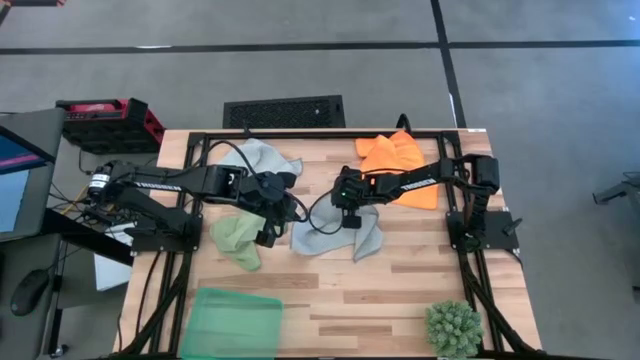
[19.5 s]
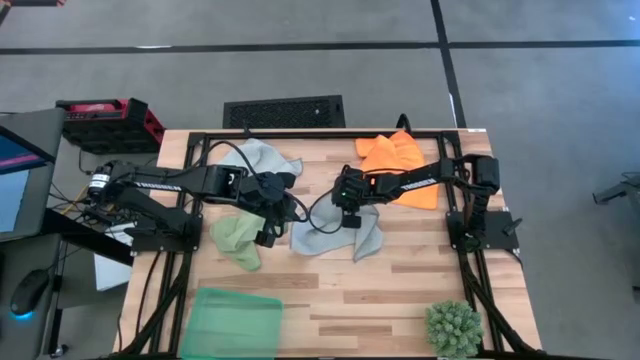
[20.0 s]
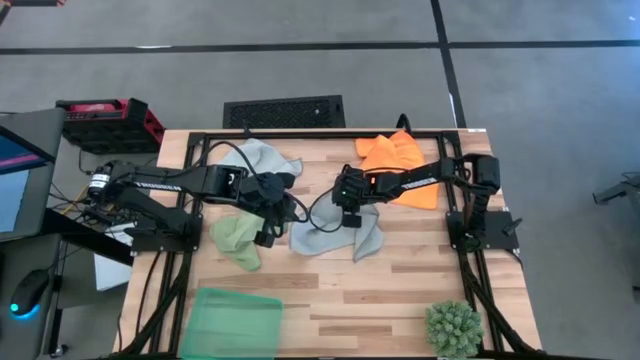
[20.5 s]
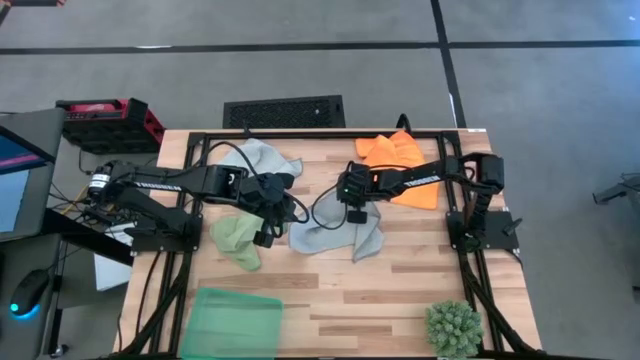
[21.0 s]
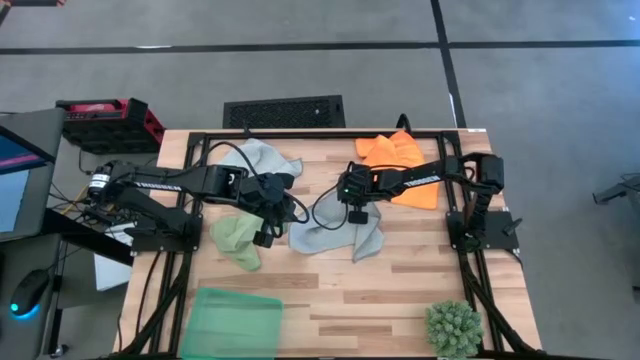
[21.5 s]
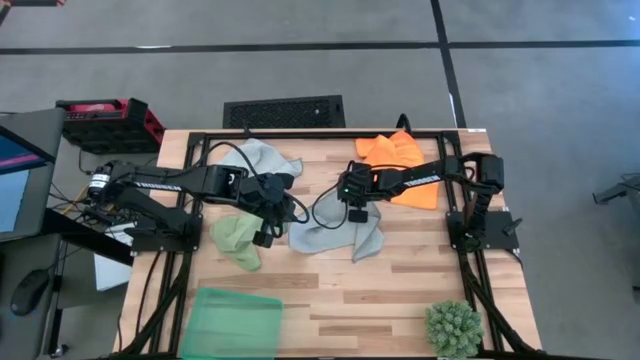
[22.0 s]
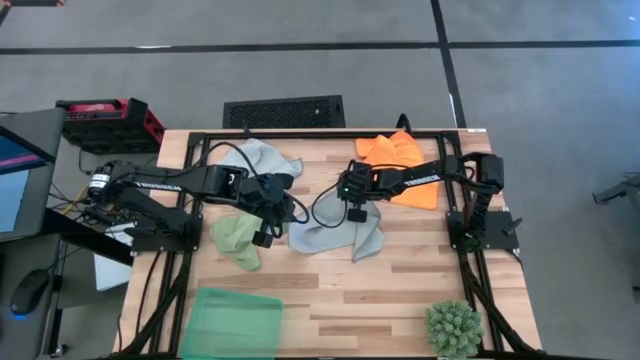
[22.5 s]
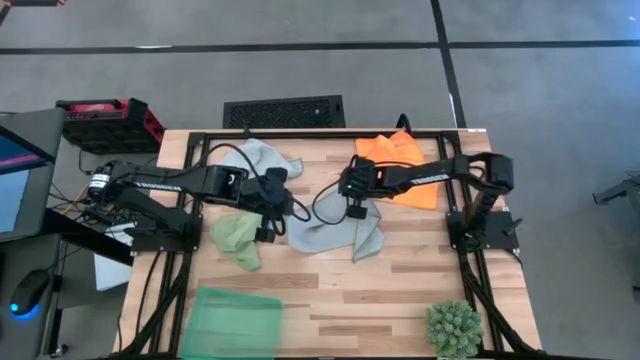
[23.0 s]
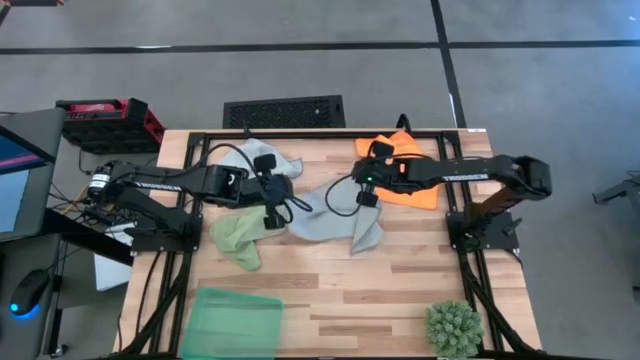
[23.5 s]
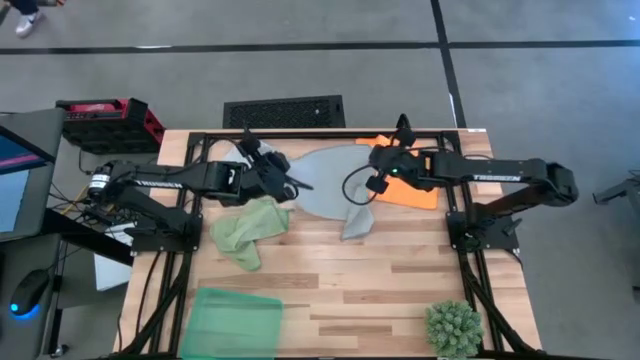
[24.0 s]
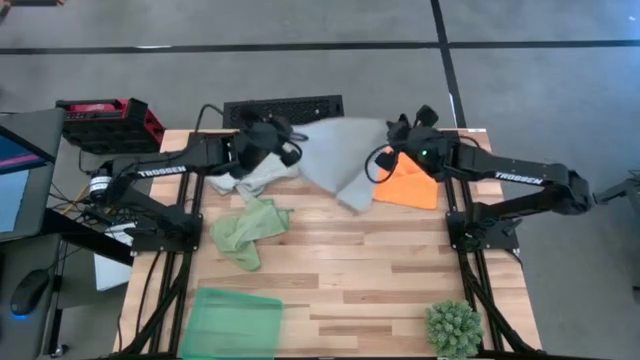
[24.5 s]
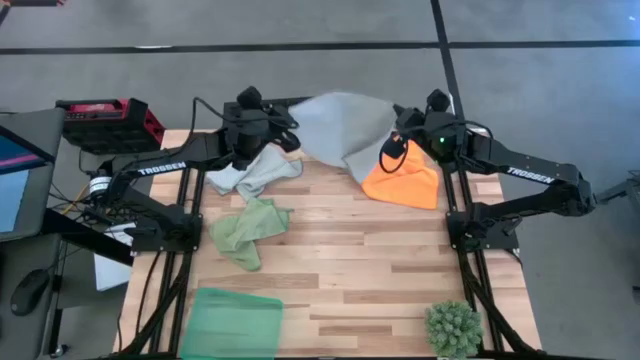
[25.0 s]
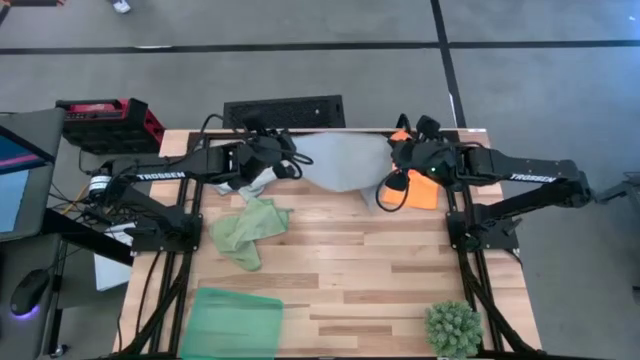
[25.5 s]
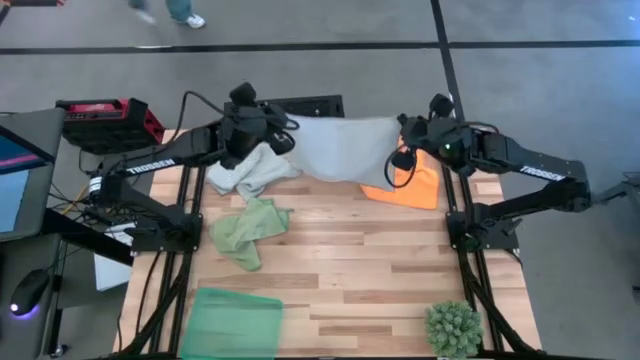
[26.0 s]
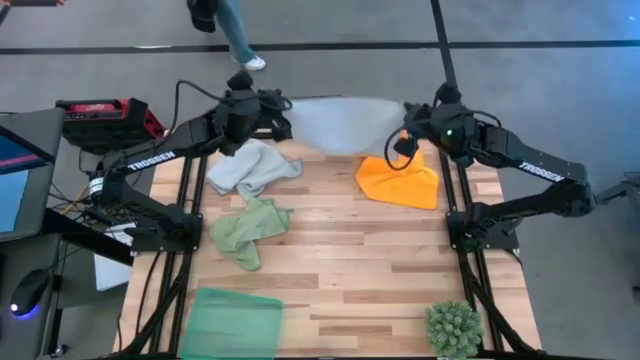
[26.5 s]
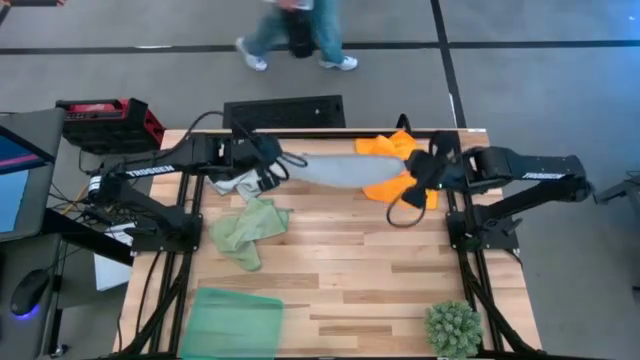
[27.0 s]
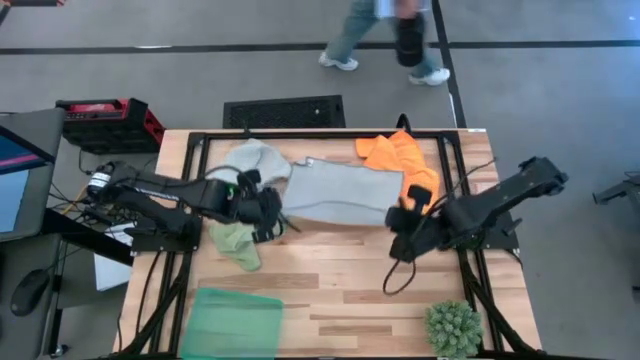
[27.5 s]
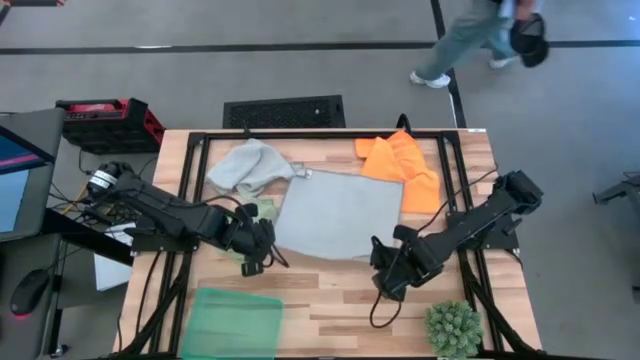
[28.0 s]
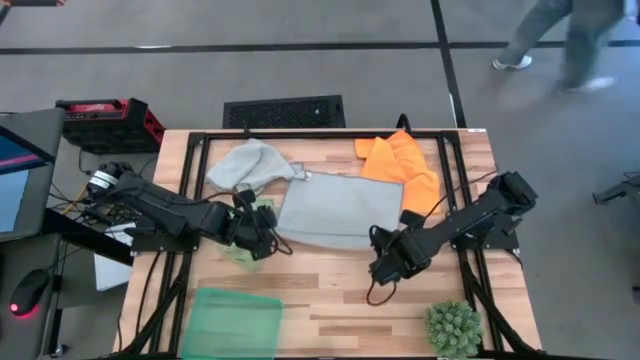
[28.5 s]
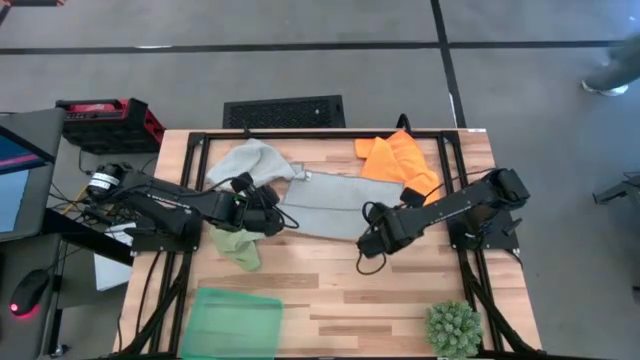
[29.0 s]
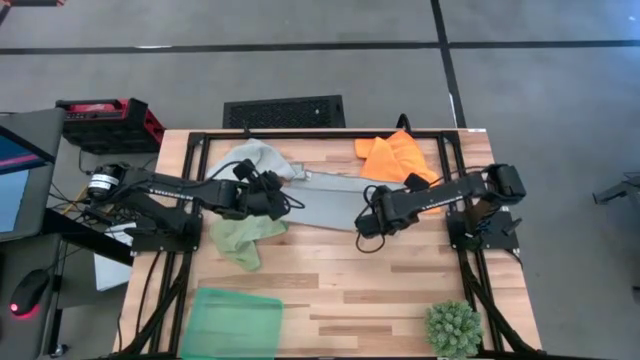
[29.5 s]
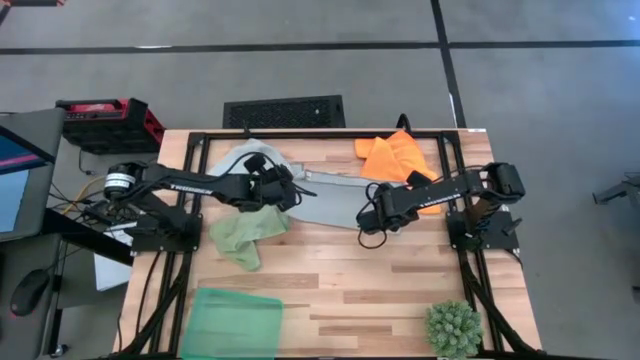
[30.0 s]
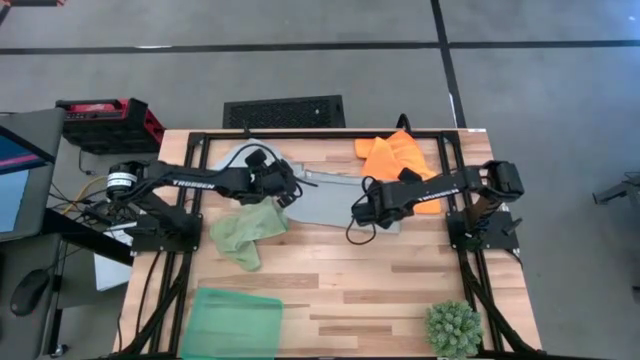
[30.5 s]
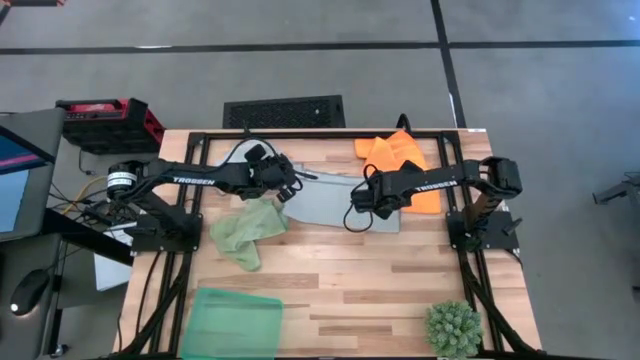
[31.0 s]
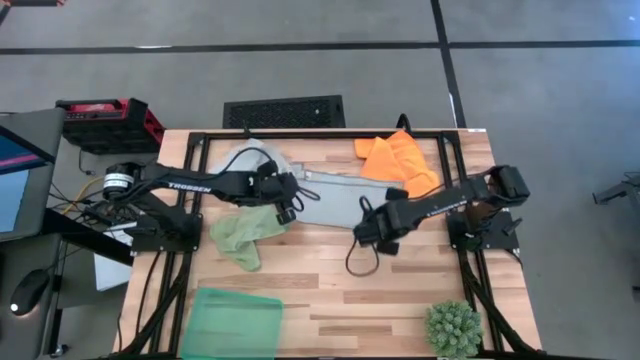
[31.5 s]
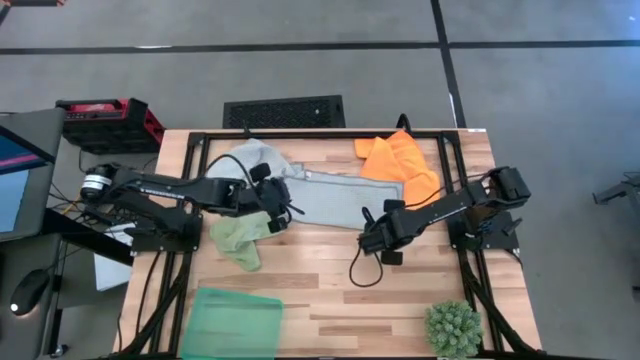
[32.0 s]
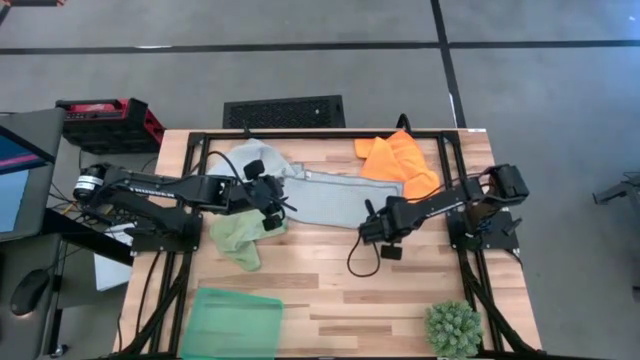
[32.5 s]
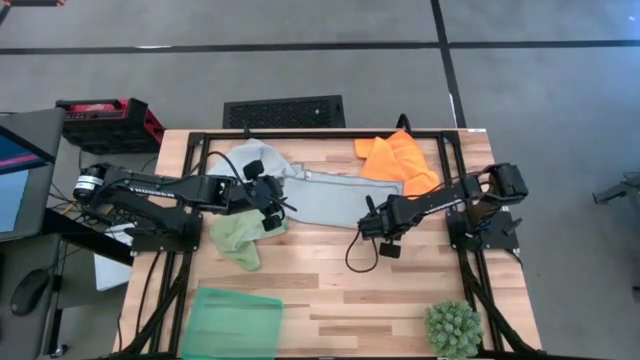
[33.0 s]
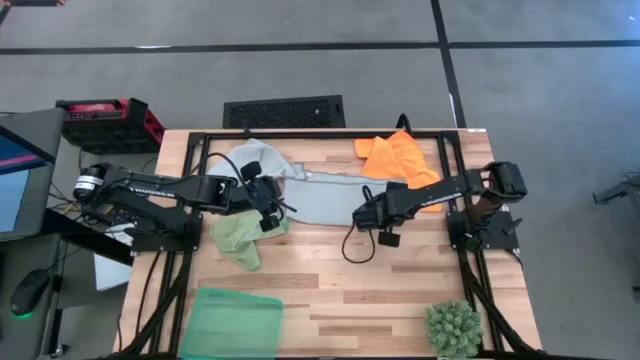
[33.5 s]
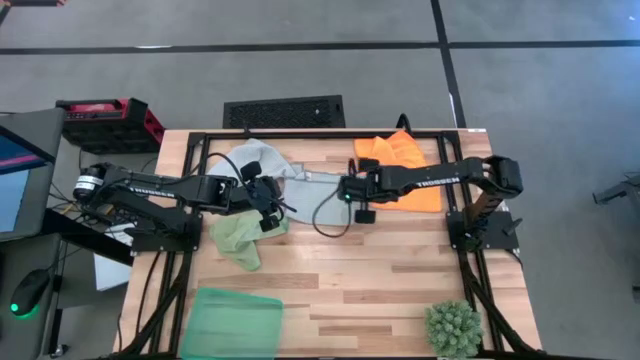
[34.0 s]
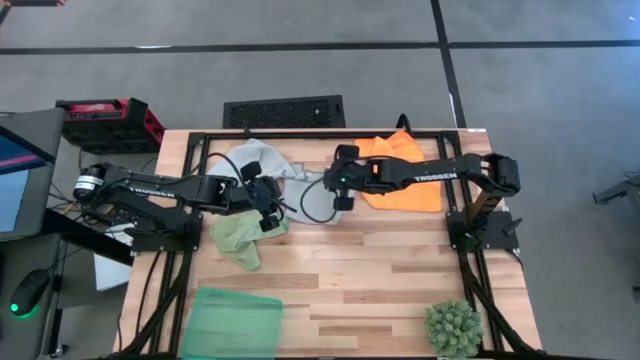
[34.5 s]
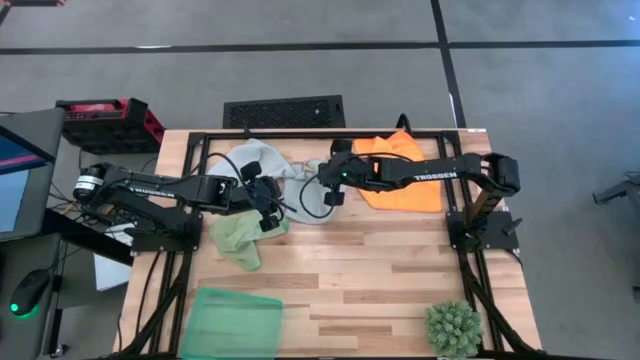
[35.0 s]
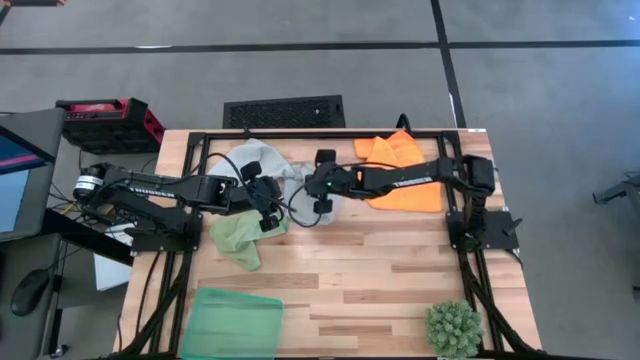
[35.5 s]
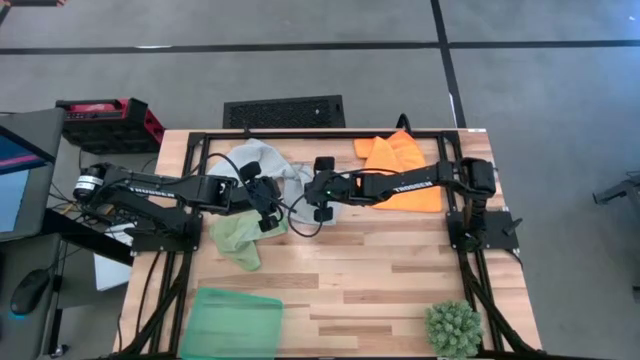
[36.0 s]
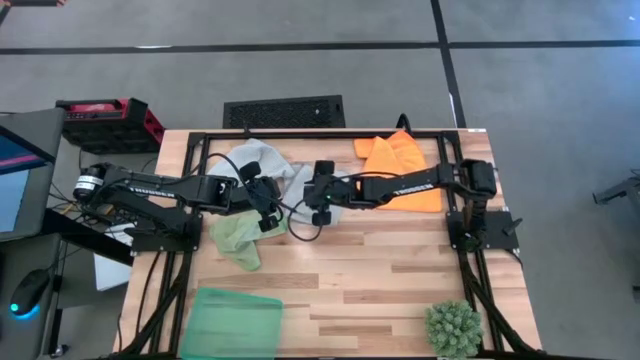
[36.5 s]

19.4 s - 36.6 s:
Task: Fold microfiber towels
Fold the bottom gray microfiber cloth

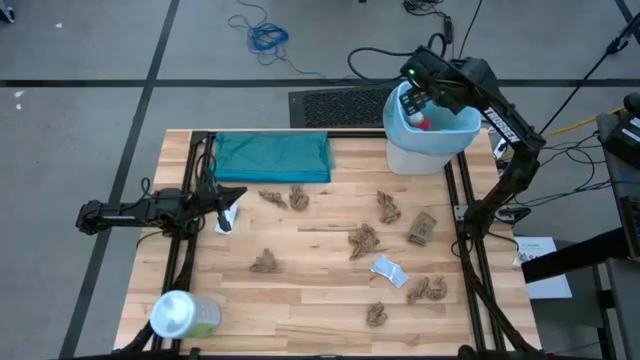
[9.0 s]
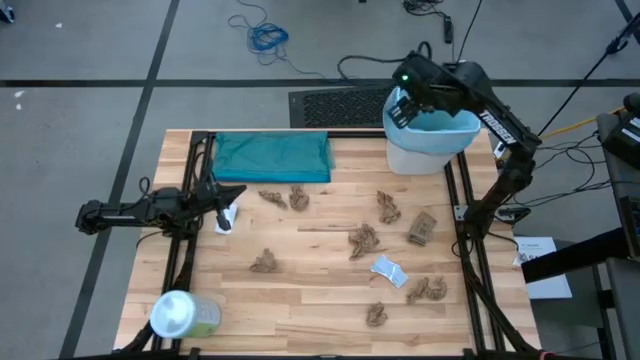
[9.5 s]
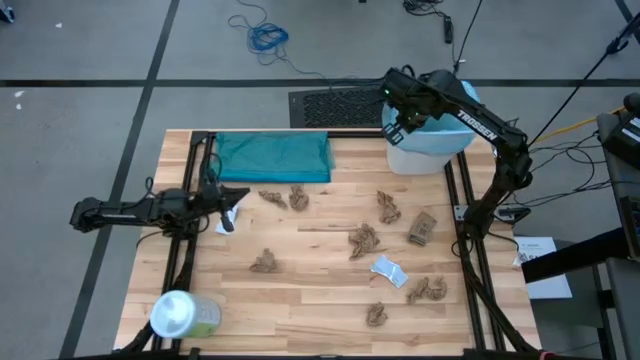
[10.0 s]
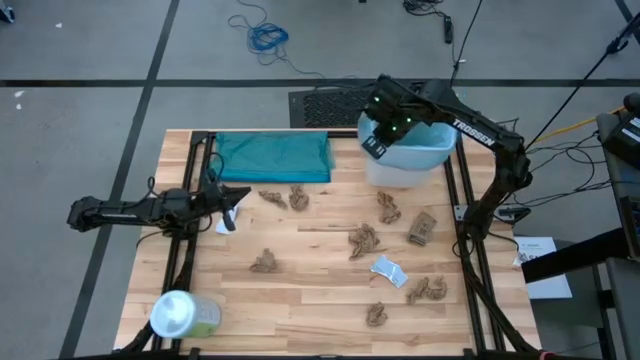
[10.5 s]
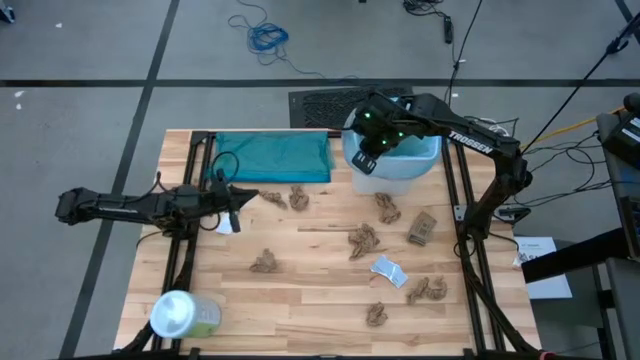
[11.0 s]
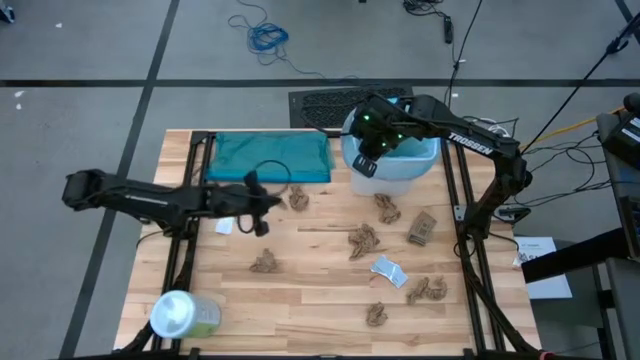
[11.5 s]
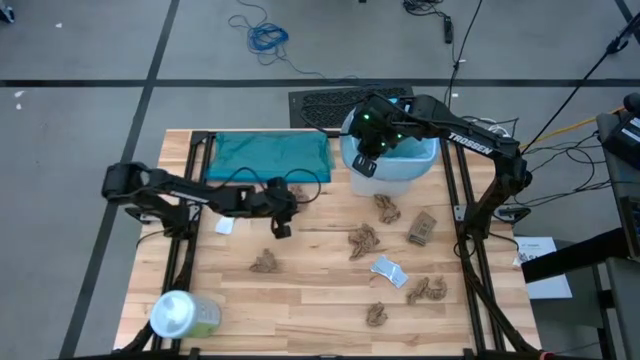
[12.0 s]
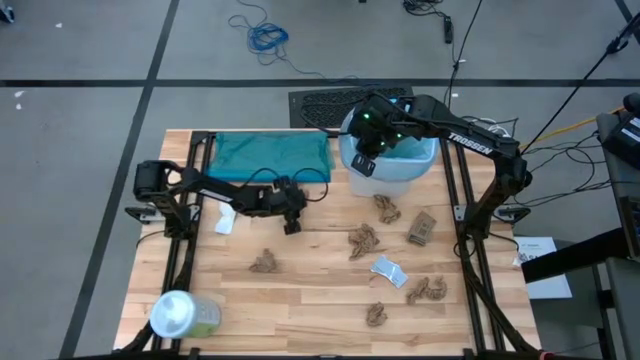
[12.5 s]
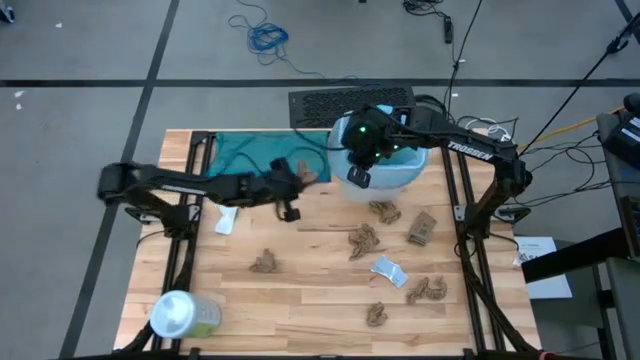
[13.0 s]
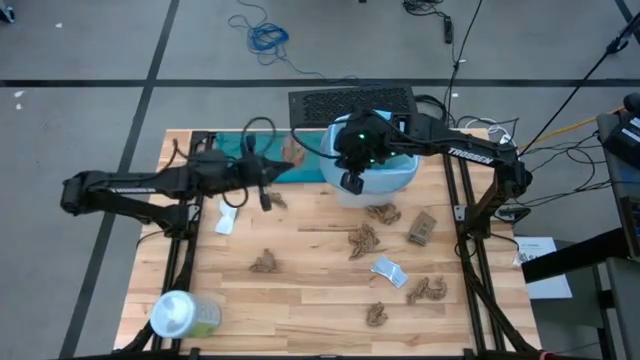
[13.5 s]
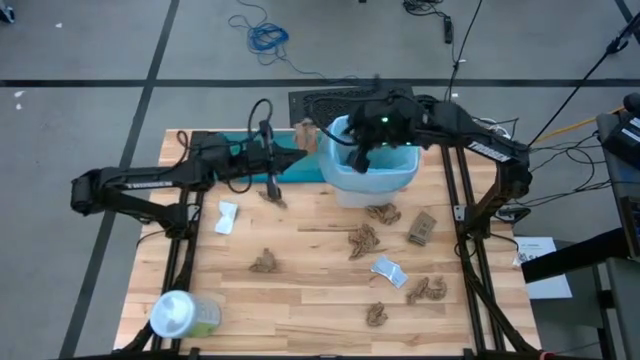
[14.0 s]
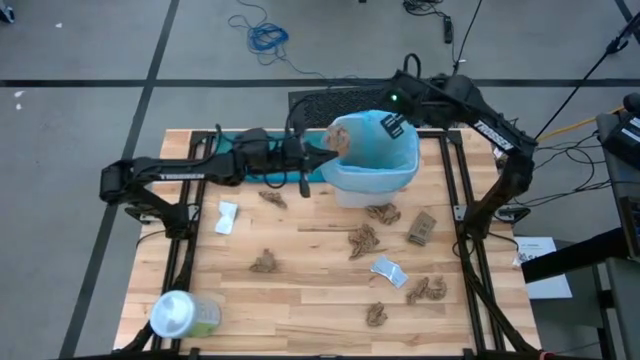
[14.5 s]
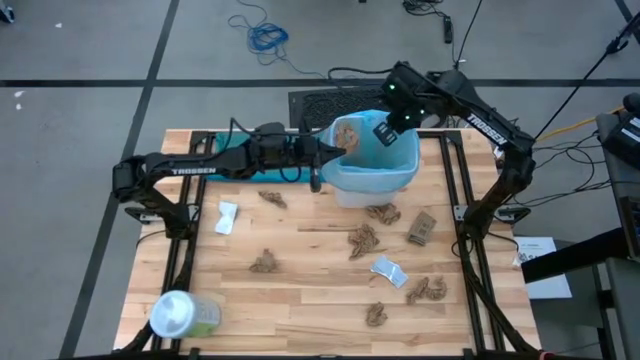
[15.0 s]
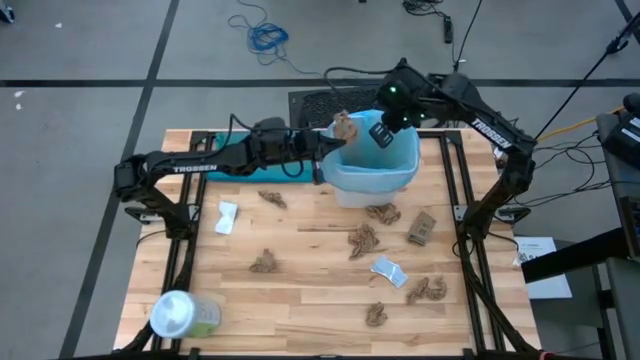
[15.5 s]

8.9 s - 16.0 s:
Task: place trash/remove bag and relplace
Put the brown napkin into the trash bin
